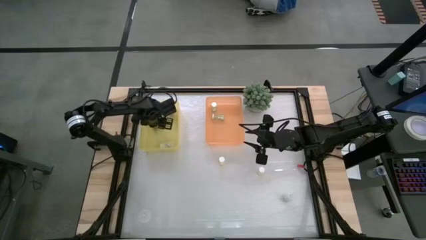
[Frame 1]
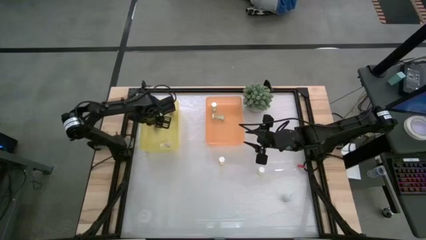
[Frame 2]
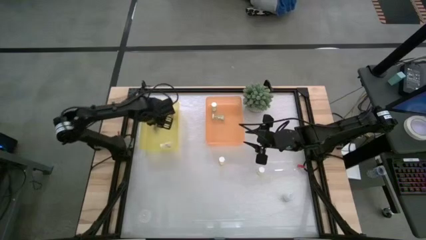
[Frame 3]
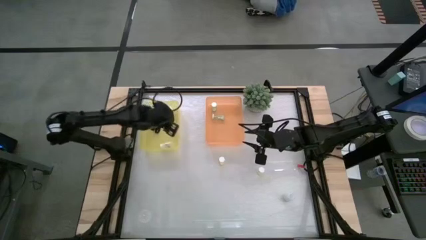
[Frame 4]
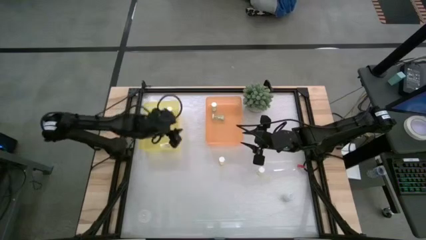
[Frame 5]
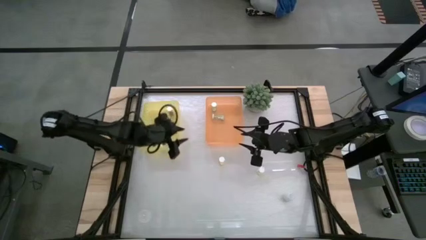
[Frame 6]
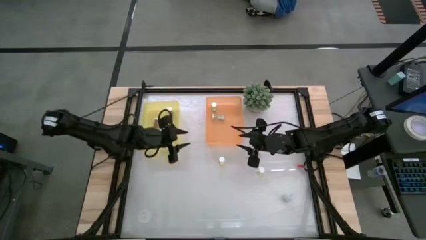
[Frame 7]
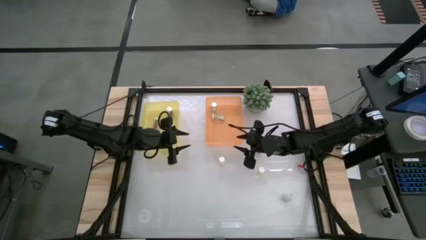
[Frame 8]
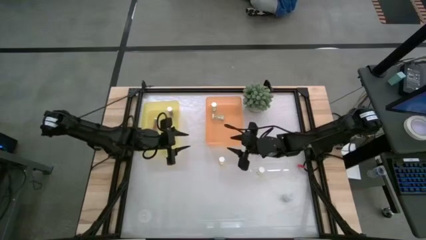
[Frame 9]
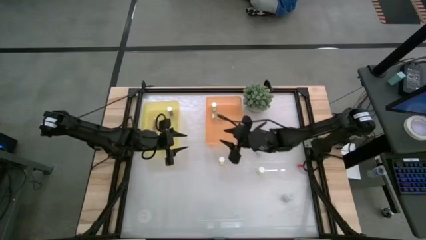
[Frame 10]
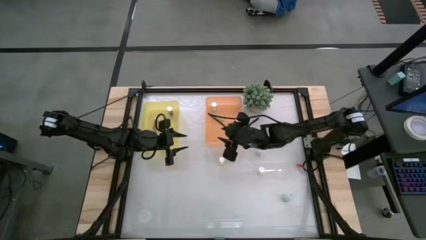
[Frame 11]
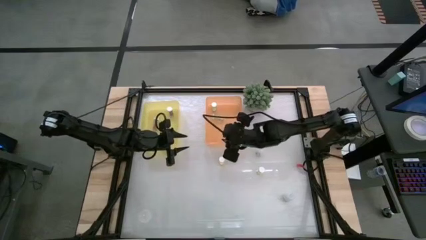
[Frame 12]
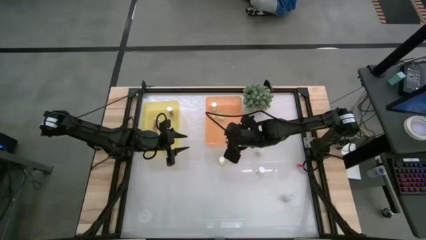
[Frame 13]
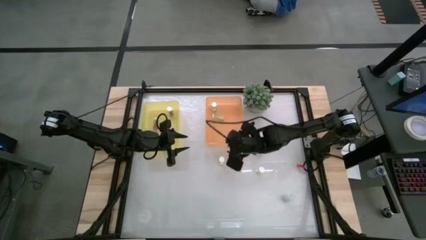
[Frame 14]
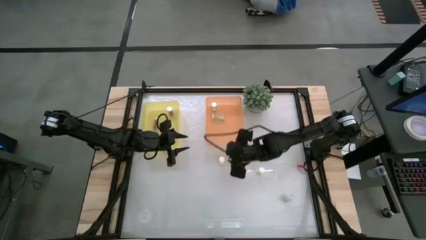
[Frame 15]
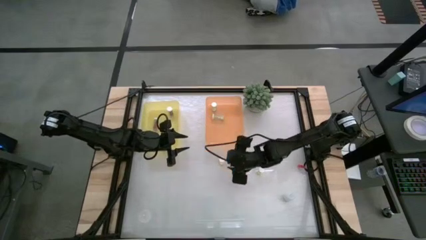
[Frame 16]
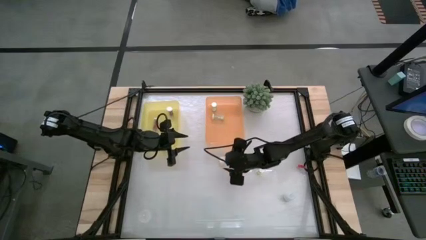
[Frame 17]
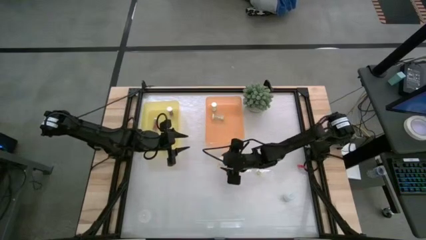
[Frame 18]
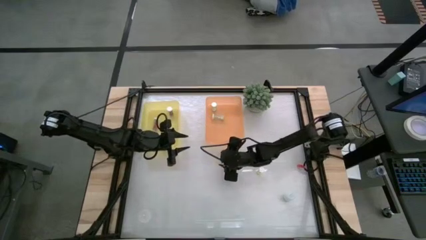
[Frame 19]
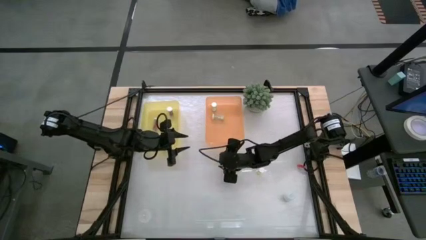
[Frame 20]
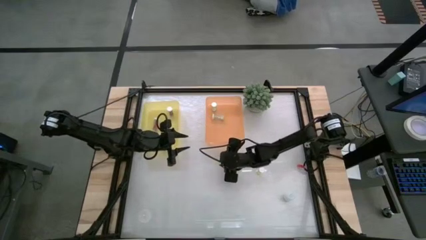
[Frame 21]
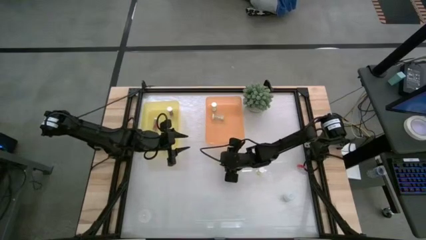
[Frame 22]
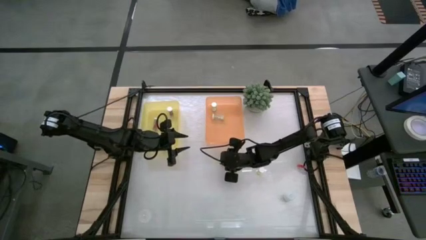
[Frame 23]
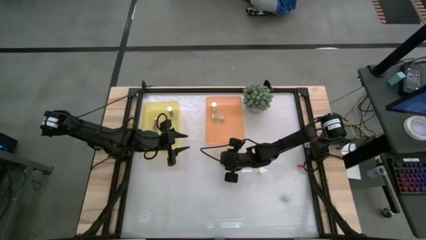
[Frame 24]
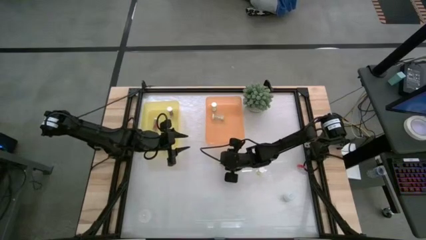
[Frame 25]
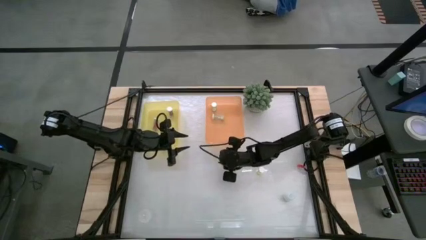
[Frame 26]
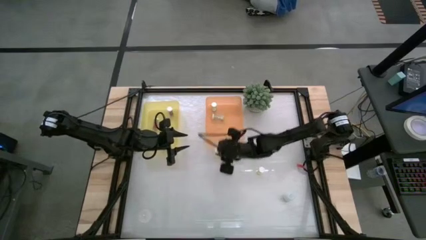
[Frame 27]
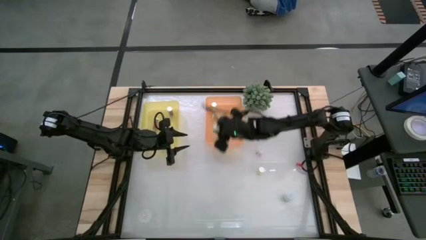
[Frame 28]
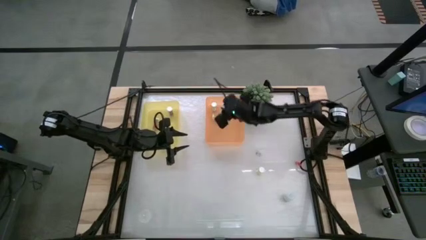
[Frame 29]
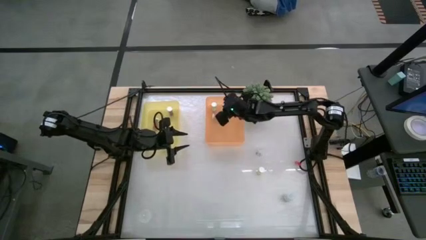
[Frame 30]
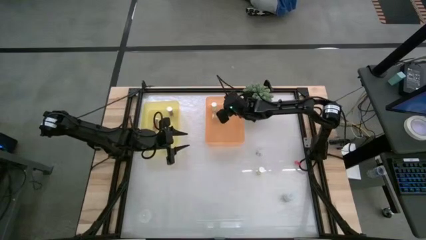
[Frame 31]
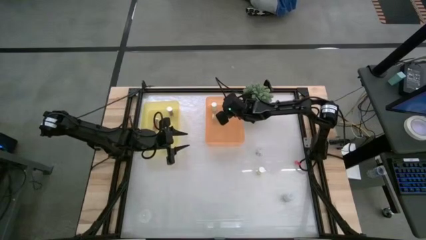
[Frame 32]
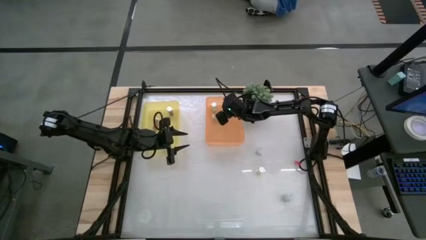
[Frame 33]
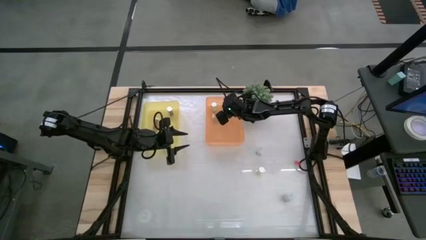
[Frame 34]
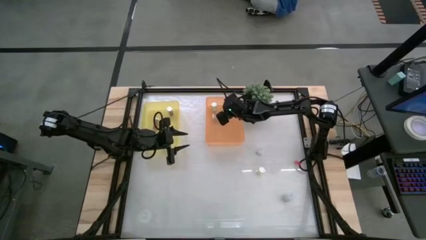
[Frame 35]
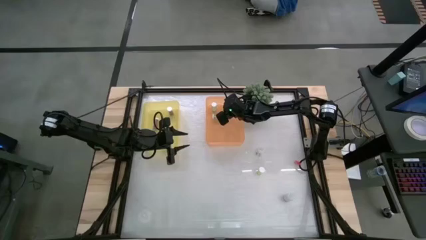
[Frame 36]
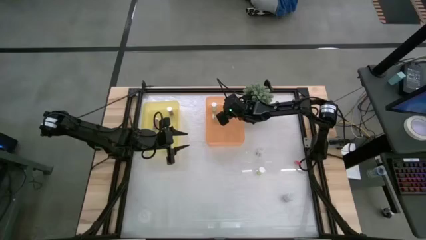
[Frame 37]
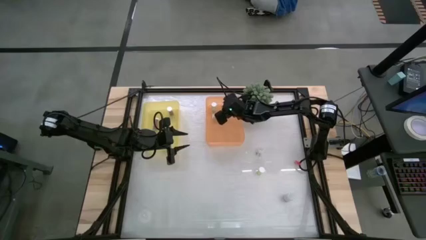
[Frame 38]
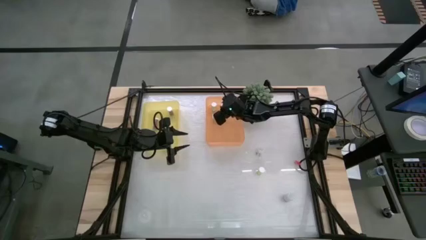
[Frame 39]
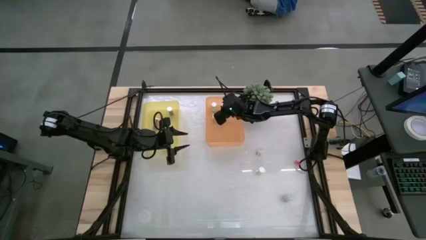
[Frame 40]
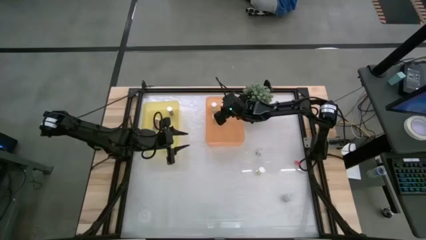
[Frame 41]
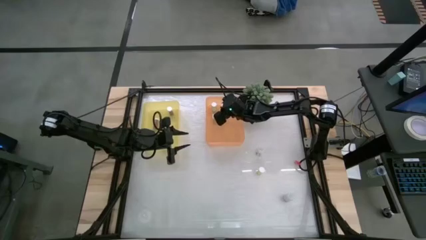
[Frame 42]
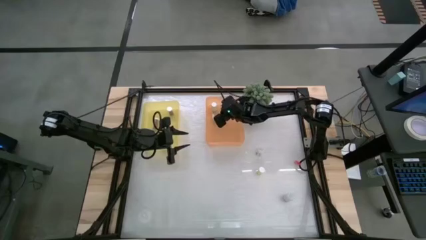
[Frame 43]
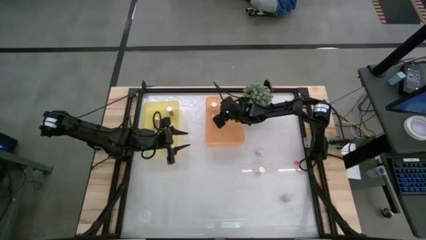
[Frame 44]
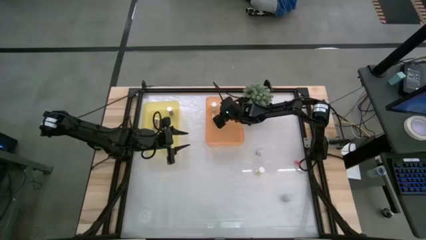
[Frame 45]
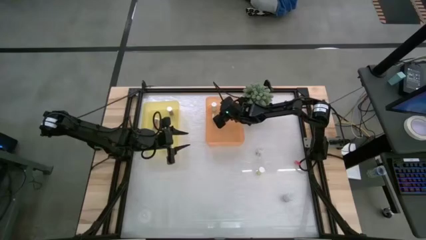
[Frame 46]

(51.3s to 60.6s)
Task: Pick and place medicine bottles into bin by pill shape (circle, oval)
Put the left yellow tablet bottle into the orange bin

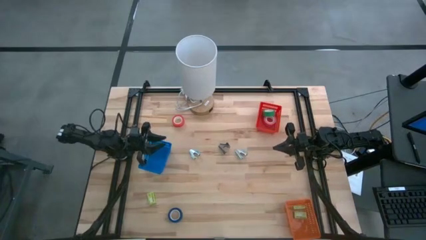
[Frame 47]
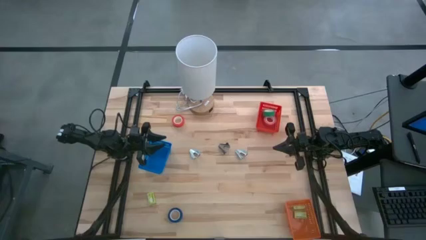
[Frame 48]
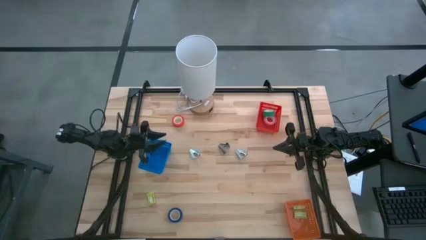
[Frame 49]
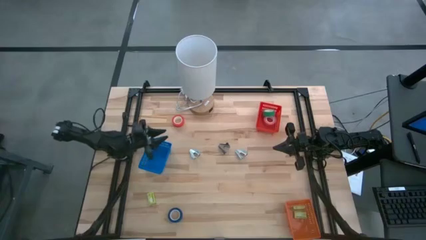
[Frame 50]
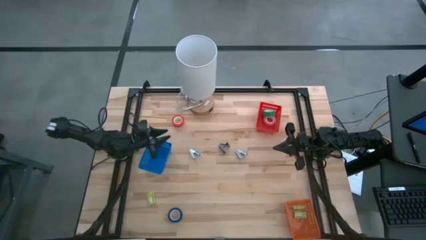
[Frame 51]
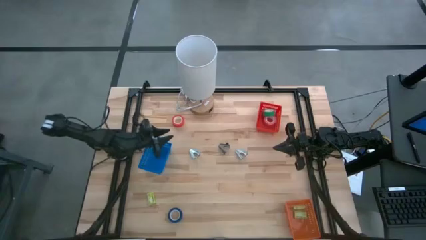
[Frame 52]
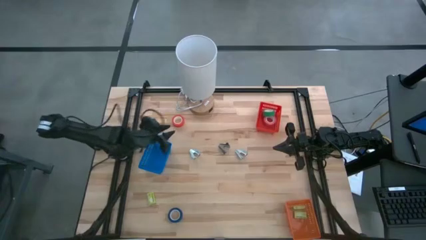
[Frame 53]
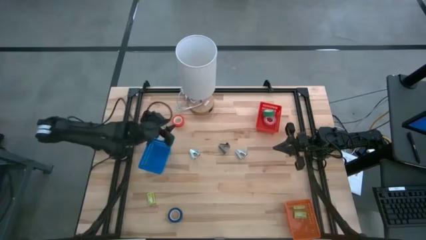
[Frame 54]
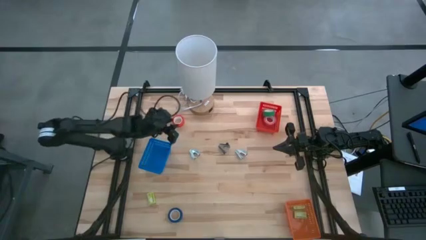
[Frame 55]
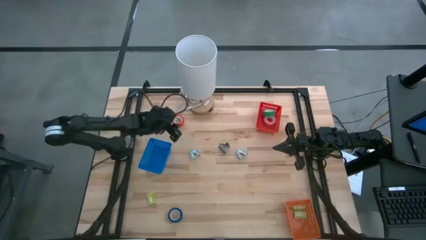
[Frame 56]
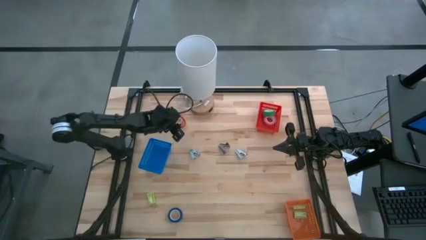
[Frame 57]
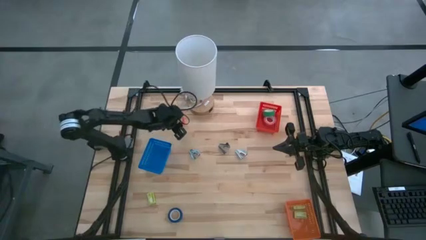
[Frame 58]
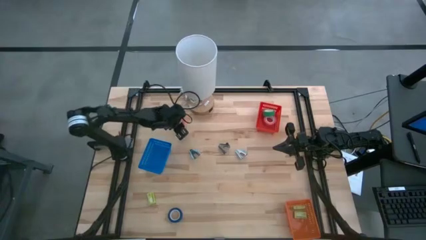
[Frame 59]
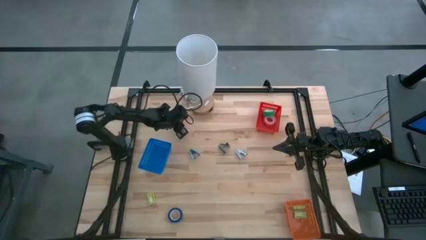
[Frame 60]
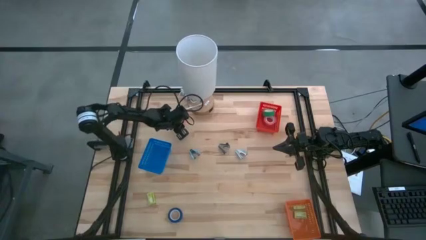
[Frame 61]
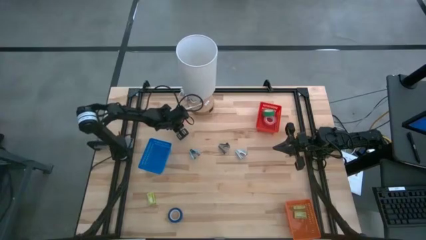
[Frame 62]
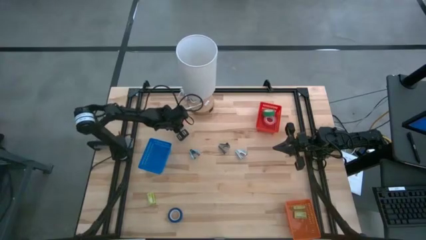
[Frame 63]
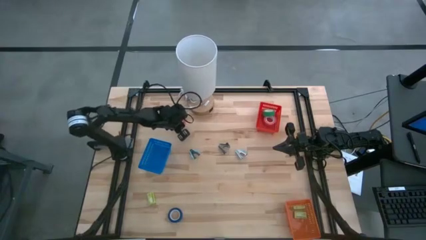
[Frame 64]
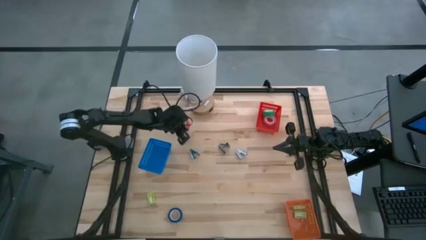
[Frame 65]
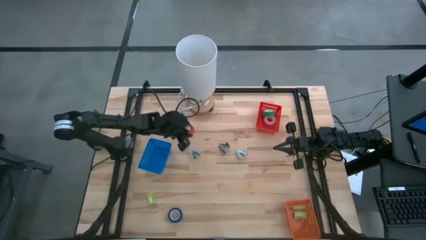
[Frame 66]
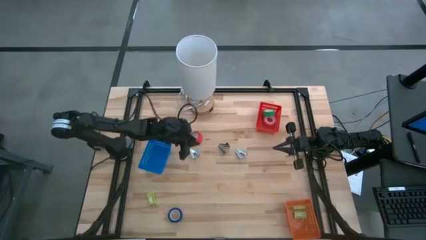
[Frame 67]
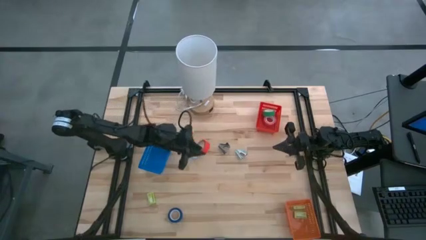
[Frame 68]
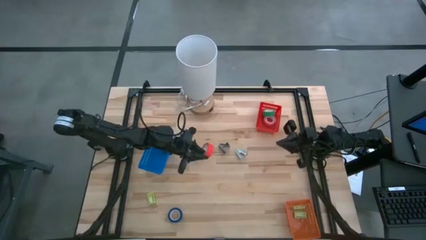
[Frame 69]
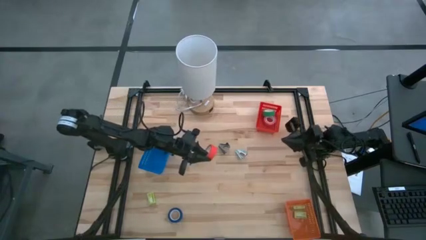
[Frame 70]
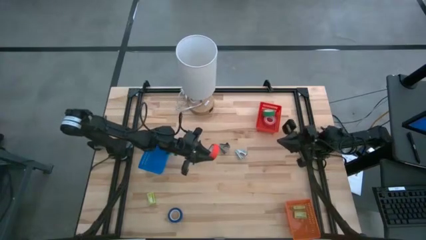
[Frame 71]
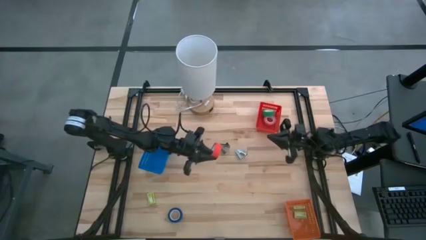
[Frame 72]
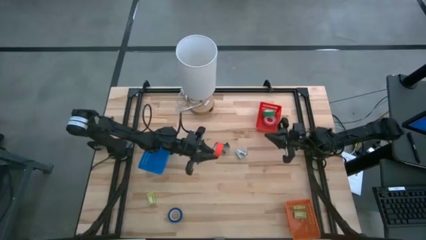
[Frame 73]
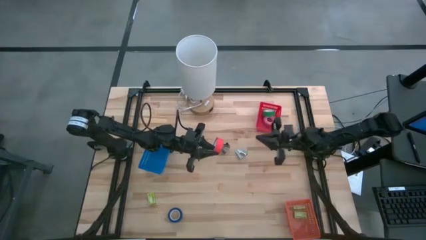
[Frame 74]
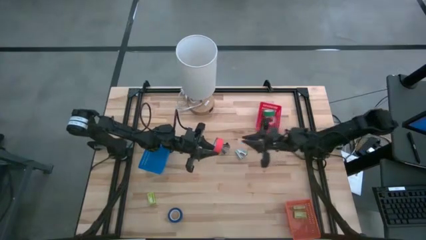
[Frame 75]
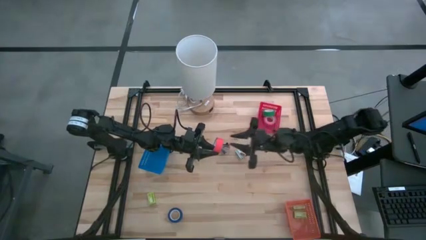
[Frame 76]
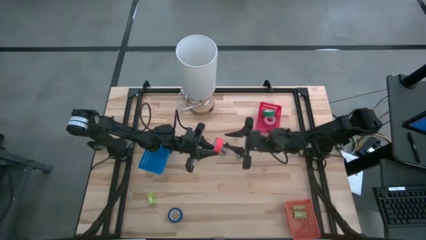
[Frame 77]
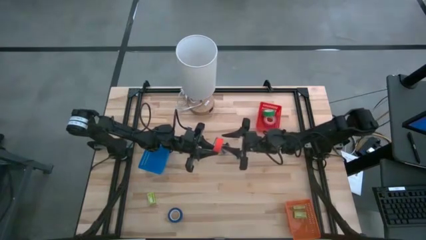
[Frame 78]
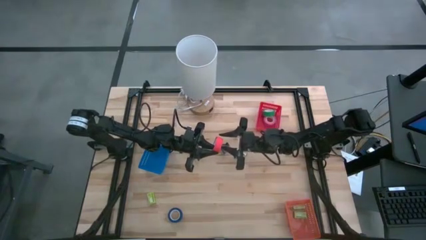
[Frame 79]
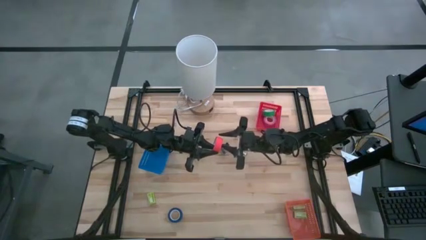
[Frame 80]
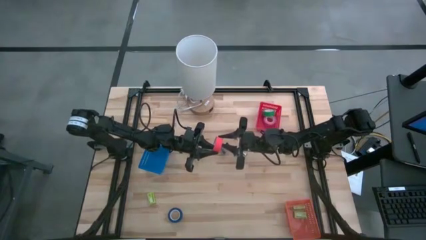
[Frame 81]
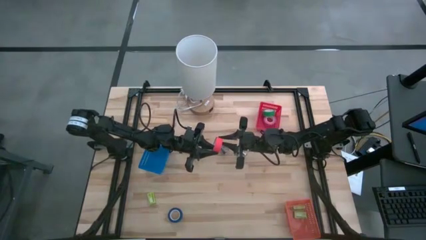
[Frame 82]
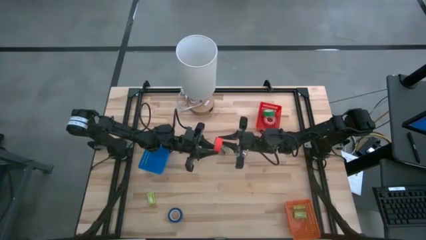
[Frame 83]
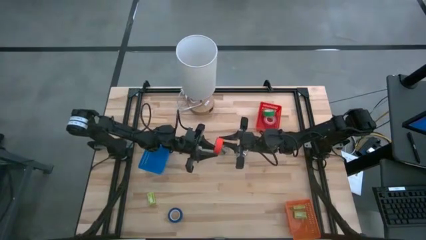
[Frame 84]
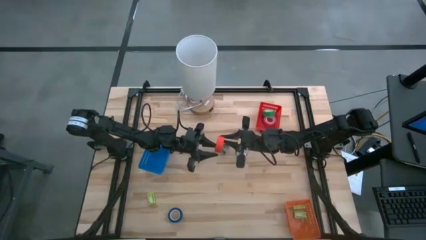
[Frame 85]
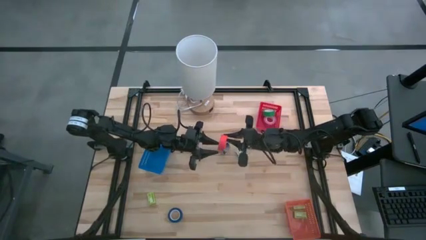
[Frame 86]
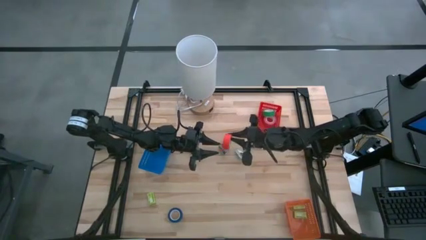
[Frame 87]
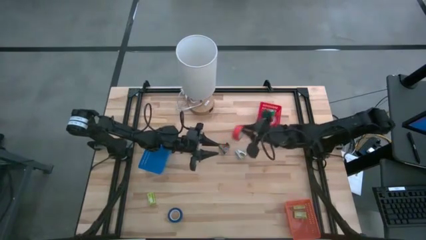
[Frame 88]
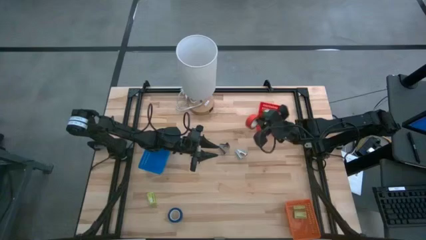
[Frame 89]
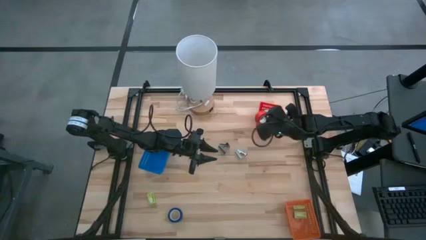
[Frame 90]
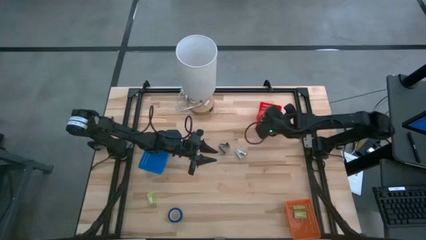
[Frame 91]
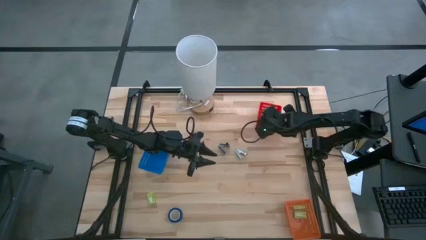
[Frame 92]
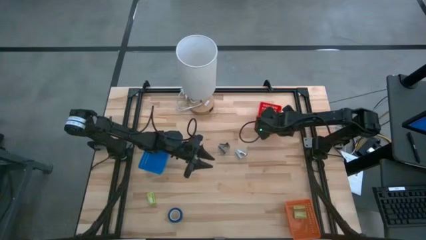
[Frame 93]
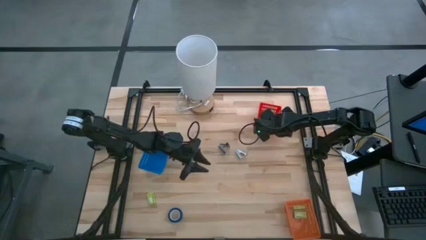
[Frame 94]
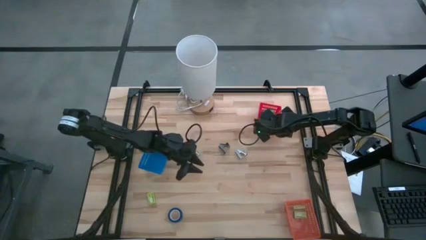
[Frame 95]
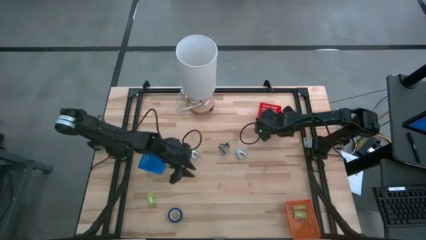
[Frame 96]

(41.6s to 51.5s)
Task: Pick and place Stapler, Stapler remover, tape
Put the red tape into the red bin
